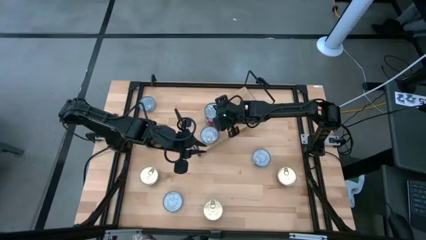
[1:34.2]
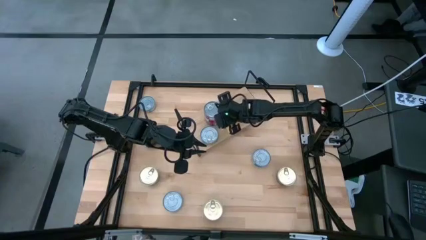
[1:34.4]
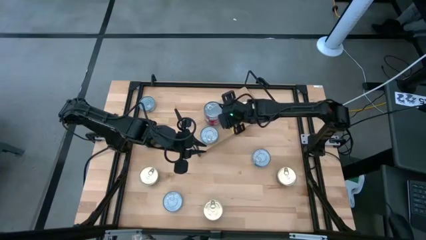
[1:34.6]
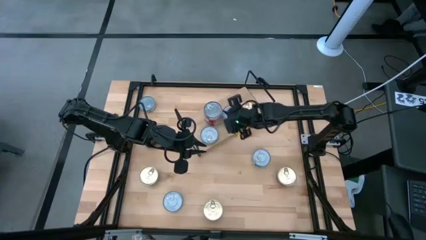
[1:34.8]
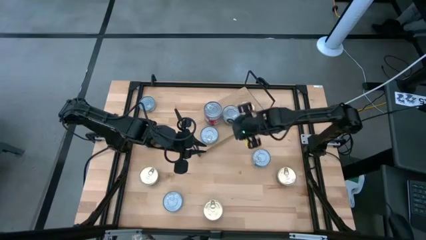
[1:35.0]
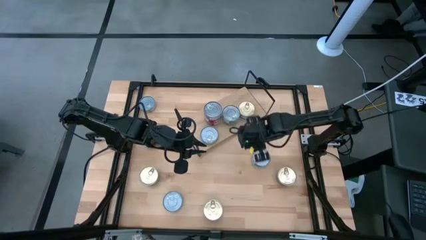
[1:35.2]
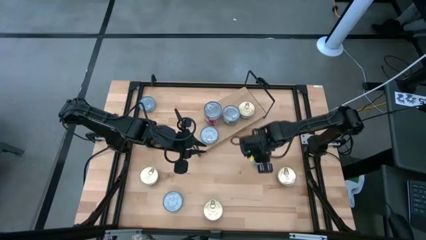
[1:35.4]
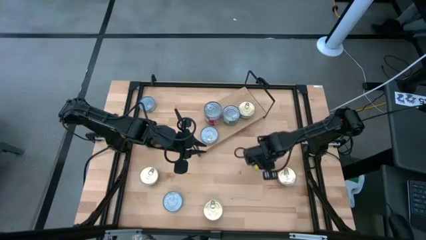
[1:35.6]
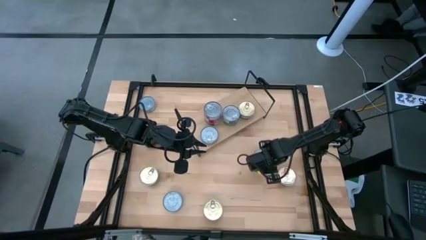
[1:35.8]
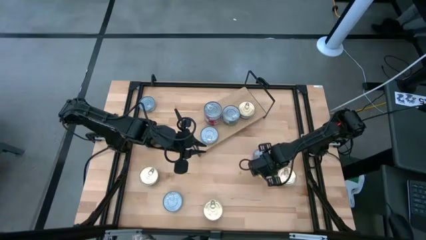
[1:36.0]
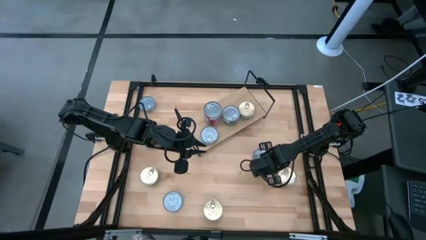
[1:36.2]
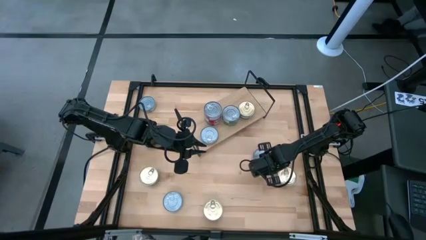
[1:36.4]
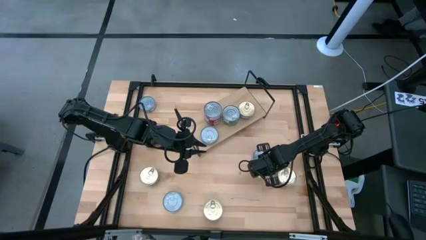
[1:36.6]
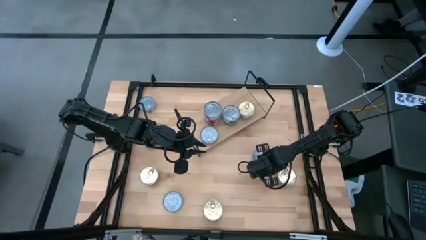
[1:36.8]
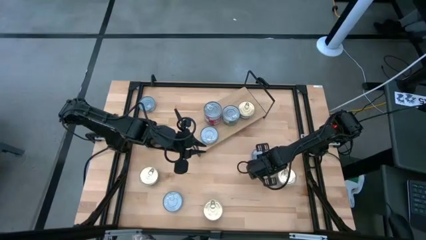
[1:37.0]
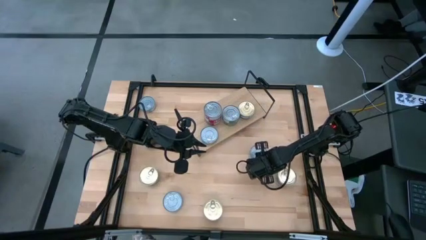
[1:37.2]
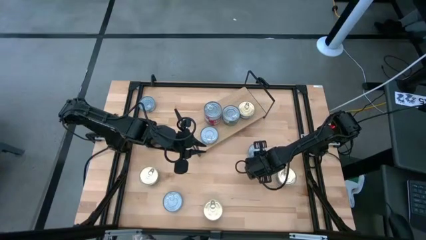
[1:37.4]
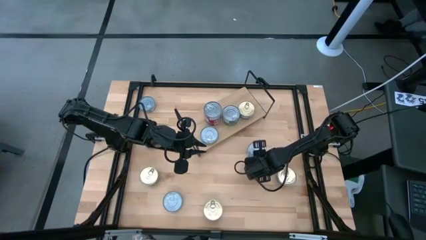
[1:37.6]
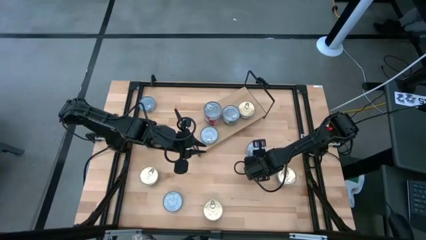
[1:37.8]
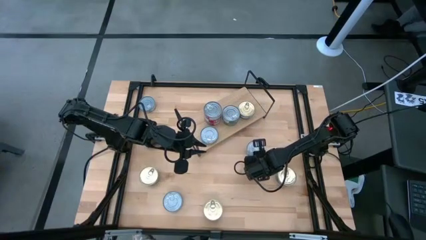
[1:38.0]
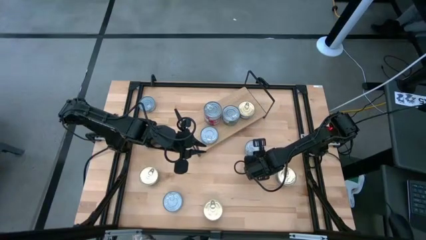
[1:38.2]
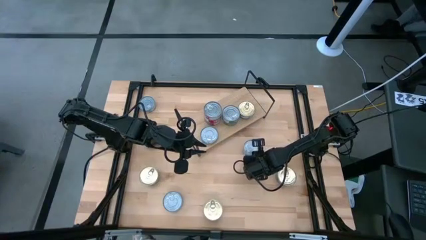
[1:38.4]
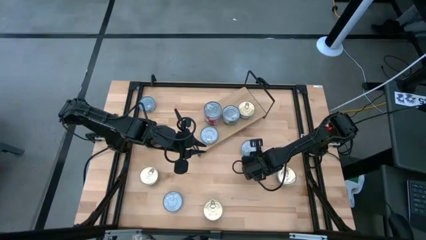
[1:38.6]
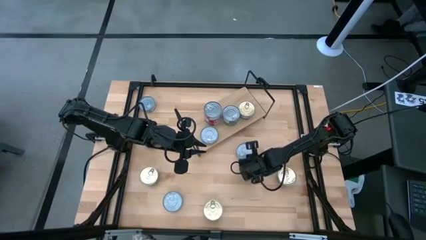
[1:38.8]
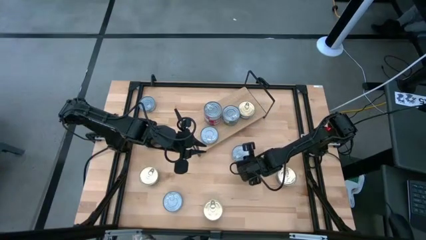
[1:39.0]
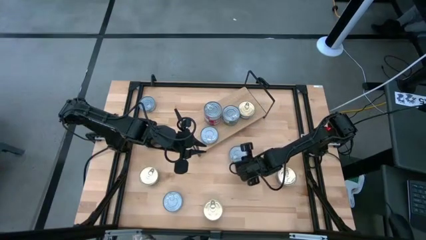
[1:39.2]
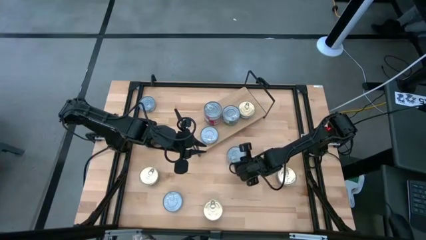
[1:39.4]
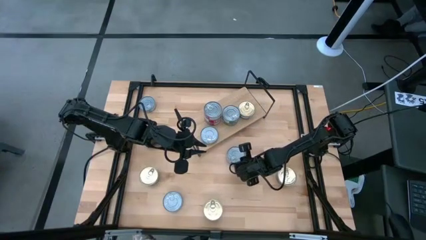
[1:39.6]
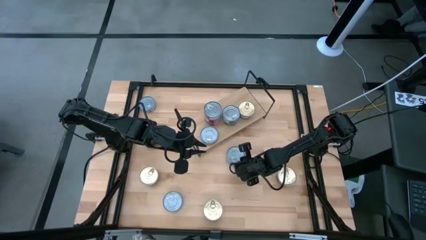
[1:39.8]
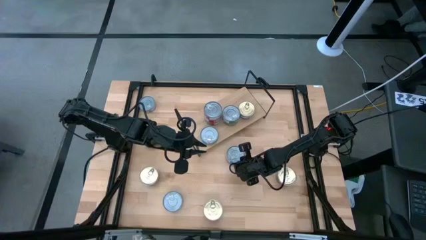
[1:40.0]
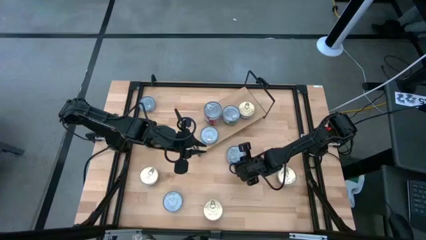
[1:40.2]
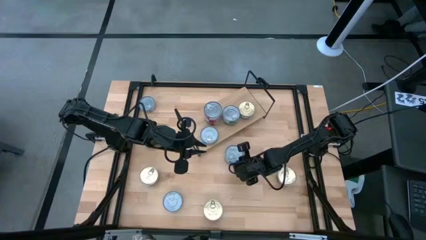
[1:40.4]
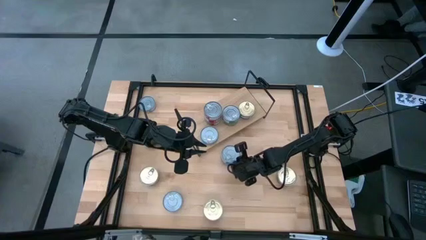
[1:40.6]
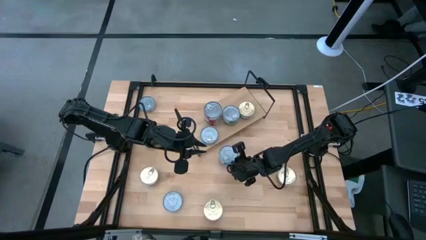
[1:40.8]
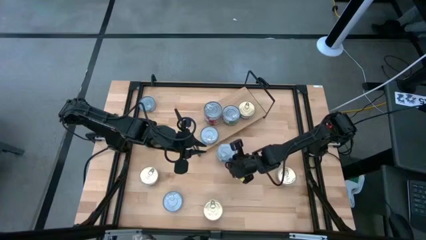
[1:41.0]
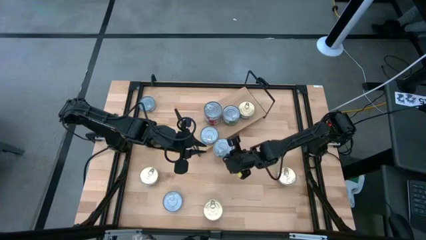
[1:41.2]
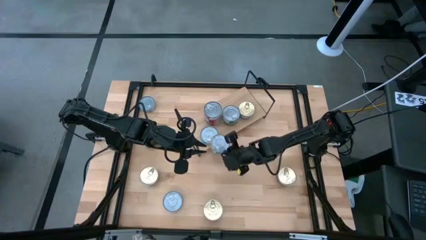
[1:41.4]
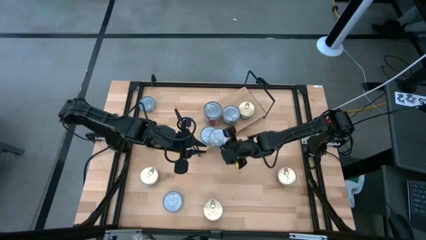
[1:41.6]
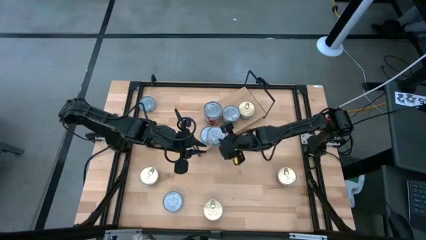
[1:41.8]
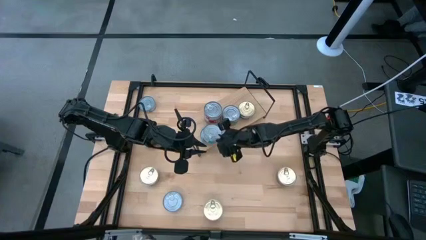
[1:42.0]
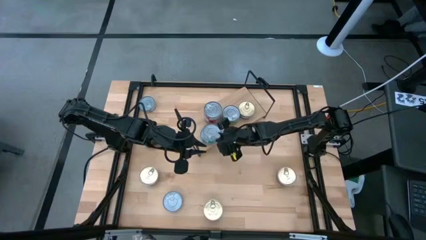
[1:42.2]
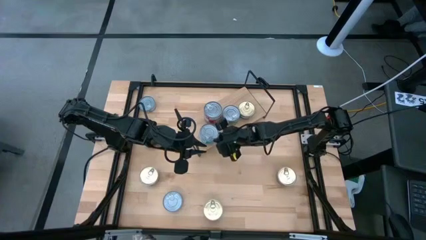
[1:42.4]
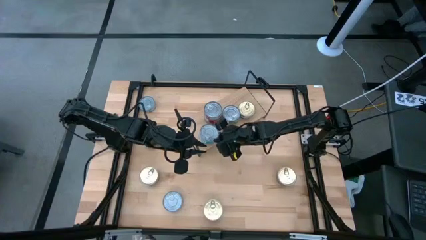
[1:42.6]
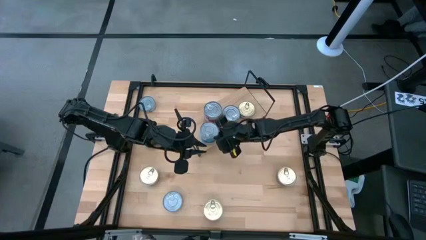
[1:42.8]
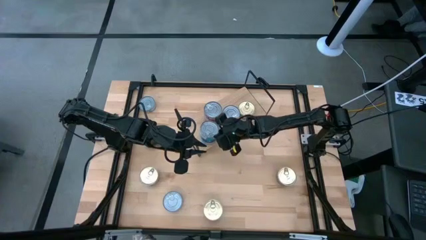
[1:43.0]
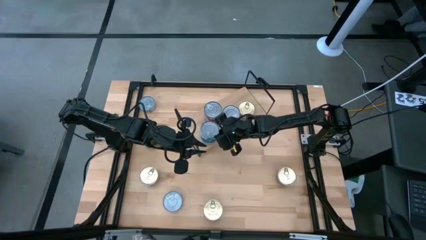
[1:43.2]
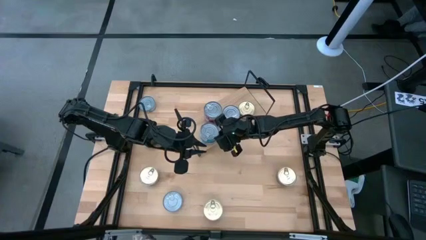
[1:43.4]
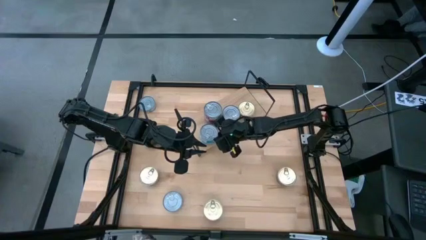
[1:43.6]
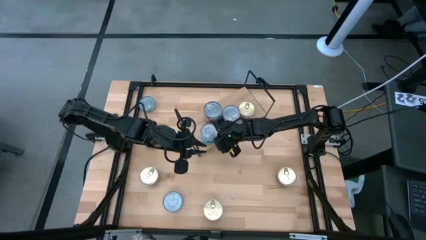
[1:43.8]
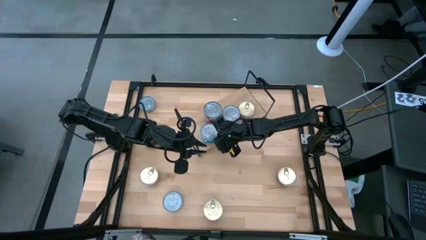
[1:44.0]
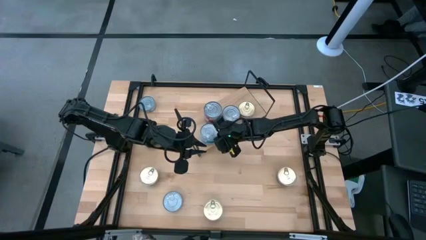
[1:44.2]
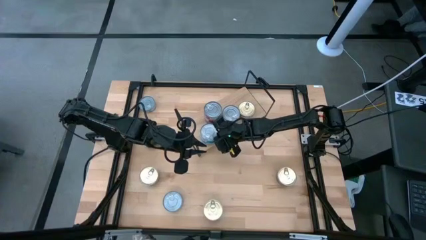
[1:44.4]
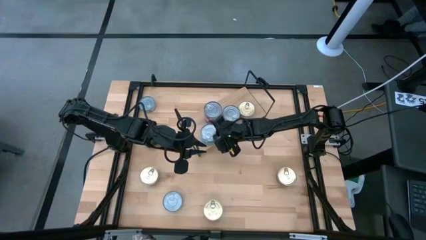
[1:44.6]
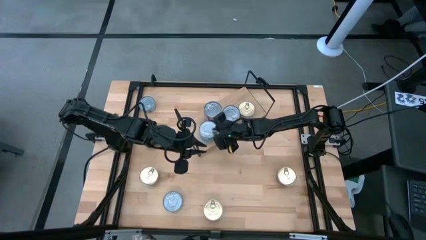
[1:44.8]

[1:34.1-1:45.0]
Task: Stack canned seafood by type on shelf
Stack the yellow and blue tuna can on the shelf on top of the other yellow and blue tuna can

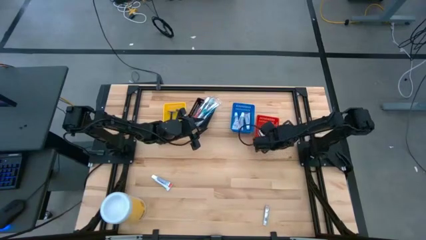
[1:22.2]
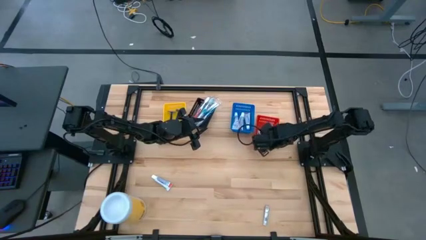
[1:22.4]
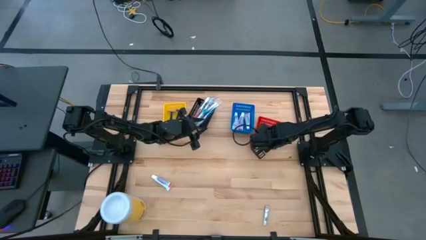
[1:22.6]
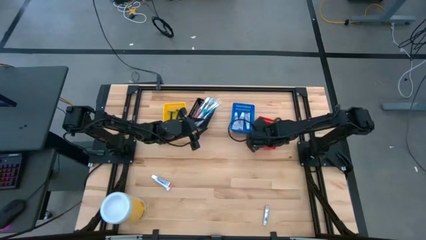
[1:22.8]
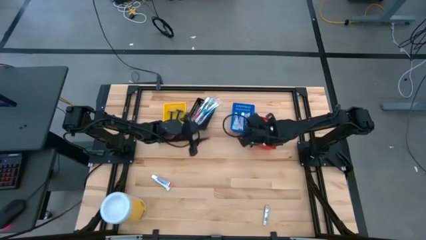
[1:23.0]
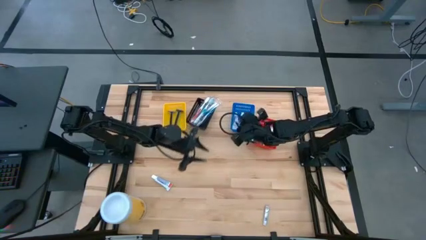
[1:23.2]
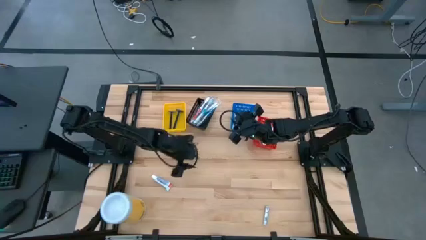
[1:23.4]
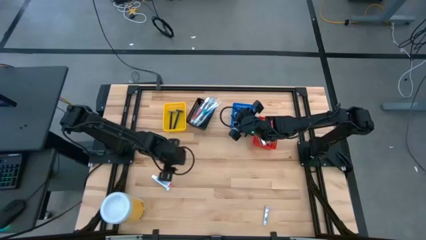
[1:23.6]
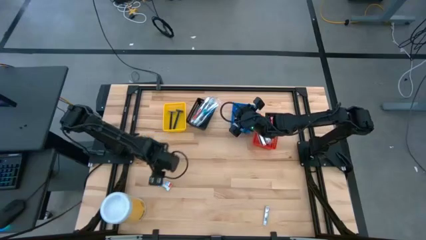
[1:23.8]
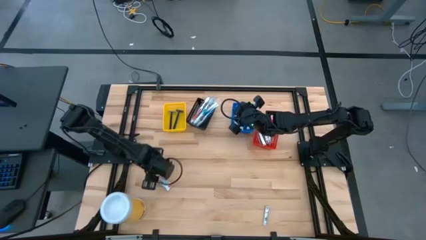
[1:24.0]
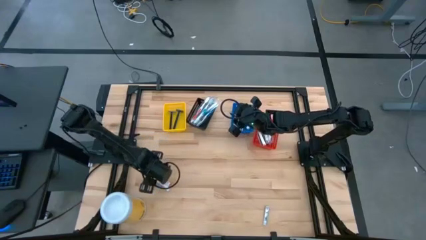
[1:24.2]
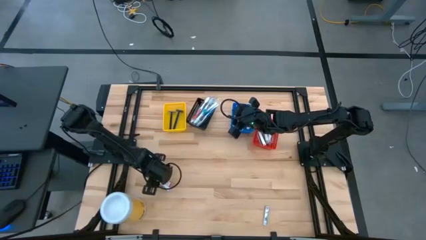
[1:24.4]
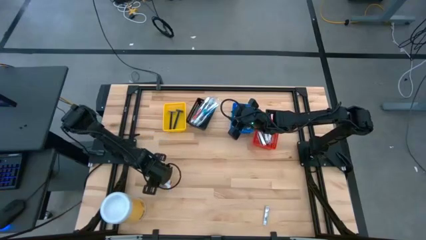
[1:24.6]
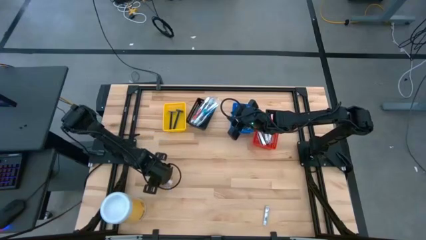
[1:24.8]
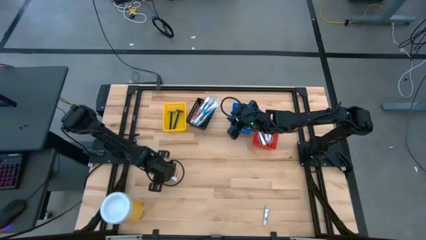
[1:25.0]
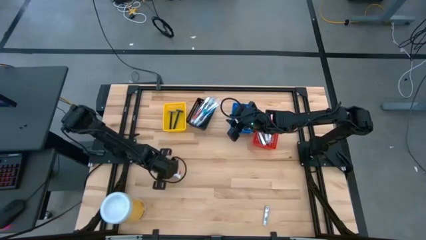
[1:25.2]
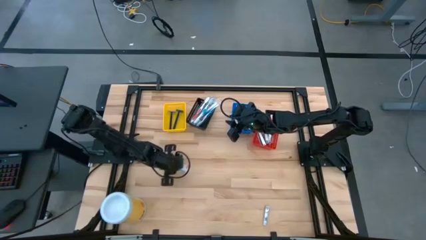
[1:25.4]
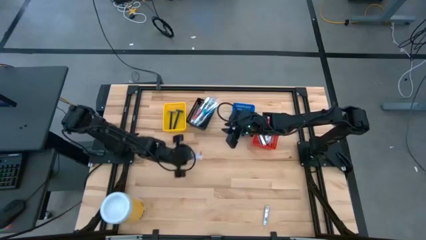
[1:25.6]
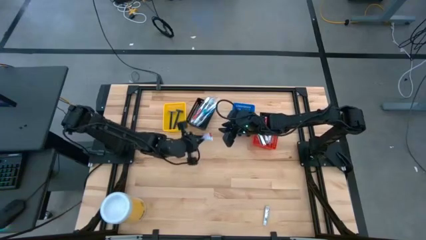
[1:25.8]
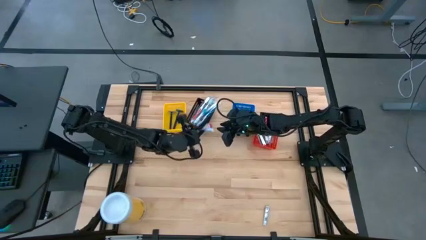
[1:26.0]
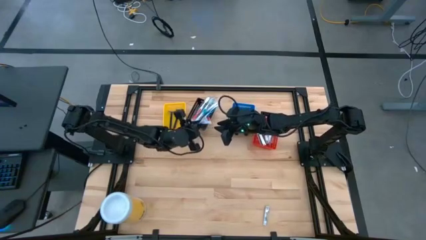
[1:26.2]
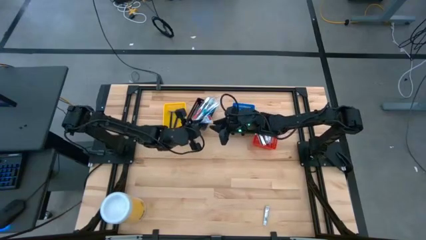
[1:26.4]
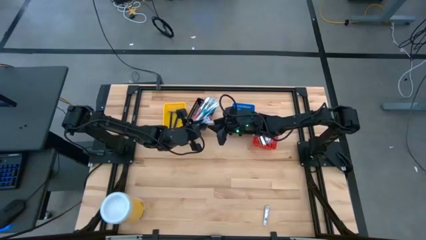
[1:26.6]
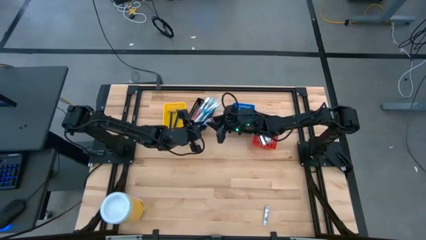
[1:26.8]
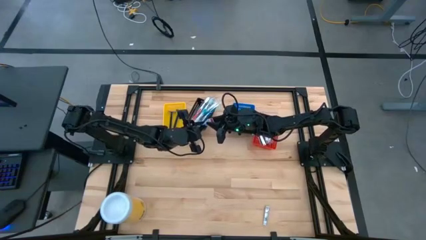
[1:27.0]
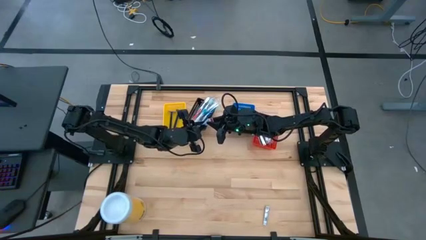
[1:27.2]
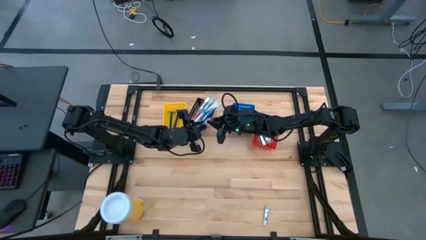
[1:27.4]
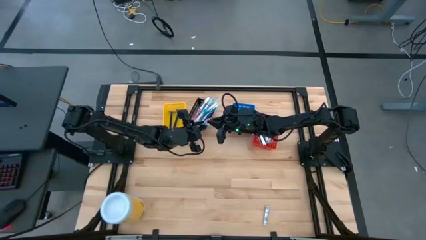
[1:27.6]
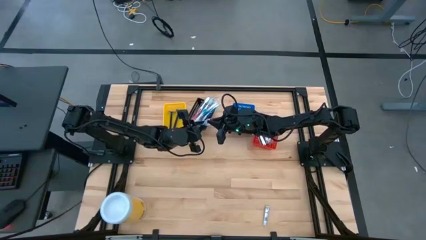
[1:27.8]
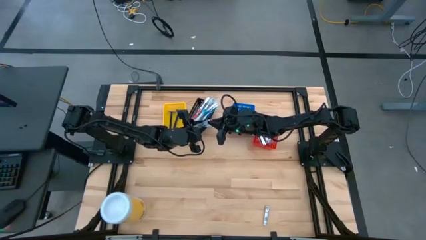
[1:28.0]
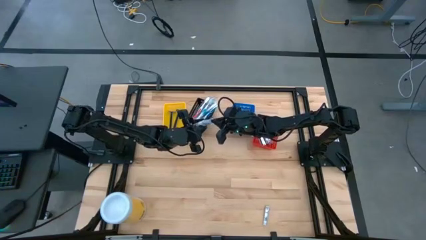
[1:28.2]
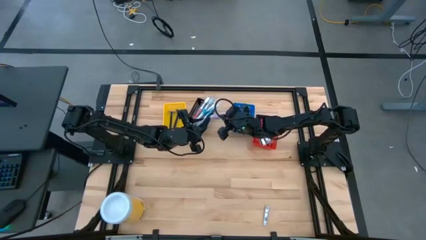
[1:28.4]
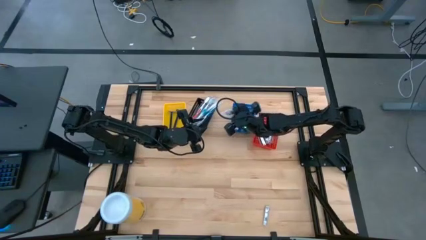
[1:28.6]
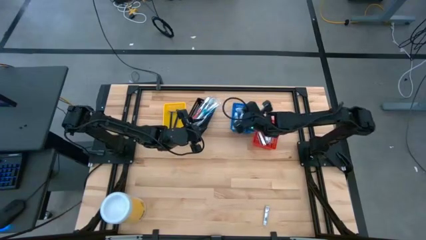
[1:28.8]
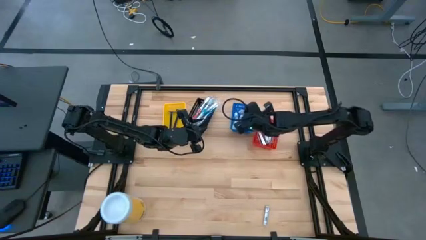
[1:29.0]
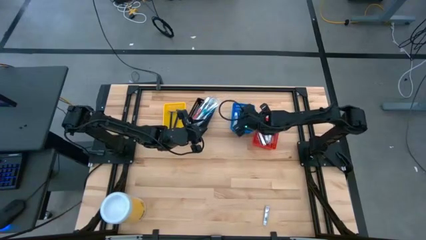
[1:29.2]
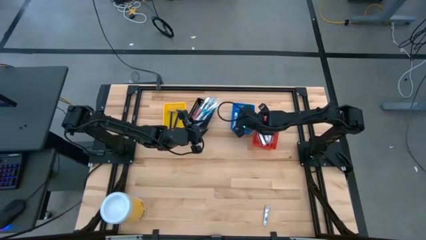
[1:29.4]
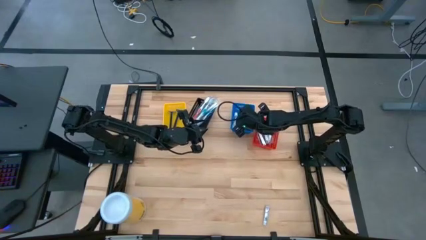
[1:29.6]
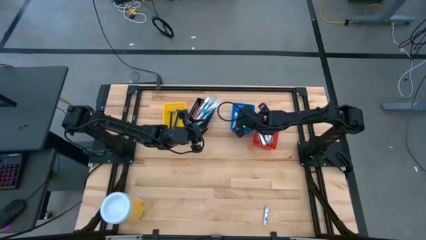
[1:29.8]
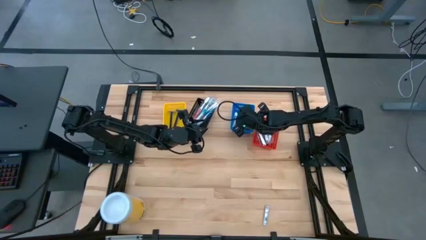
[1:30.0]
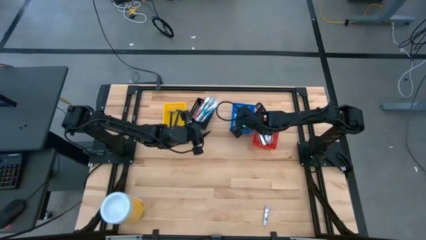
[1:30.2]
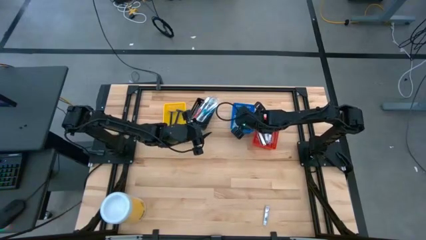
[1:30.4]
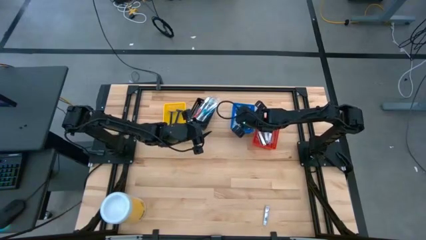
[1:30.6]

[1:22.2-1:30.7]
Task: Pick & Place Travel size toiletries
Put the blue toothpaste into the blue bin
